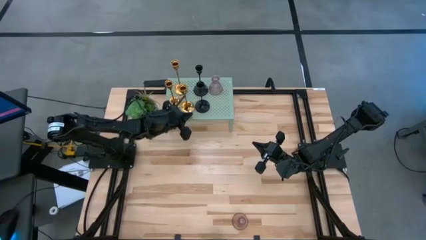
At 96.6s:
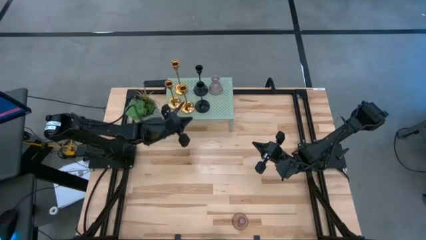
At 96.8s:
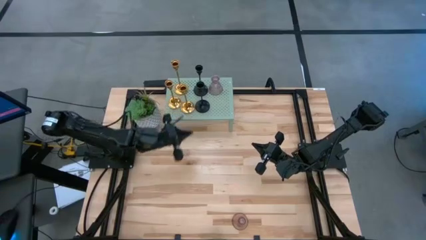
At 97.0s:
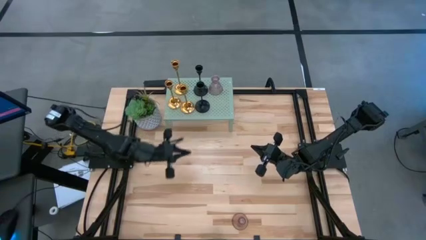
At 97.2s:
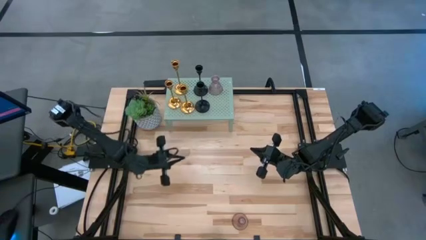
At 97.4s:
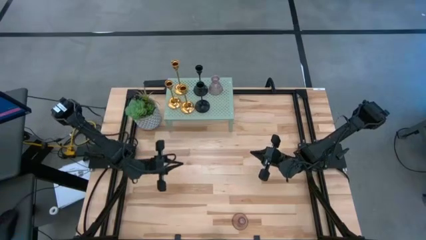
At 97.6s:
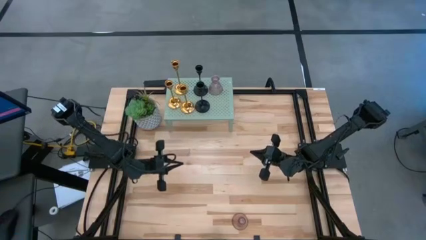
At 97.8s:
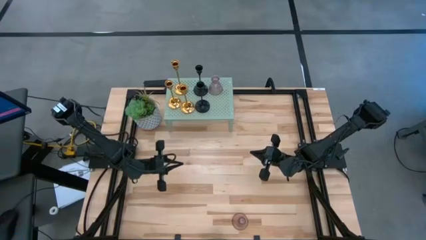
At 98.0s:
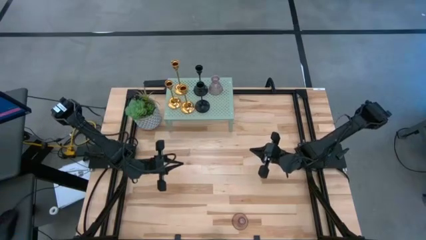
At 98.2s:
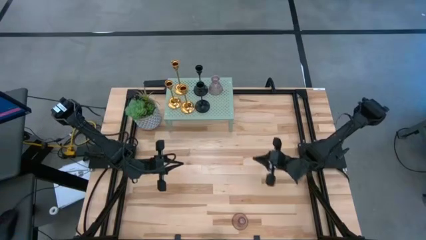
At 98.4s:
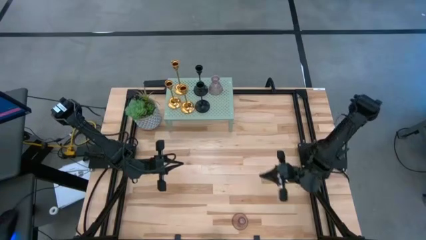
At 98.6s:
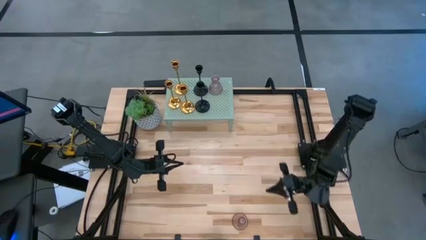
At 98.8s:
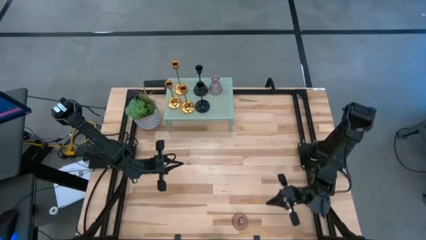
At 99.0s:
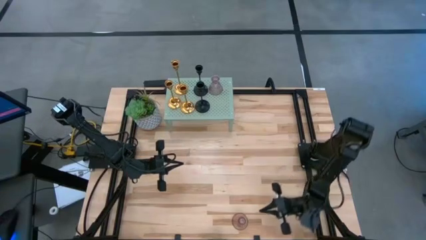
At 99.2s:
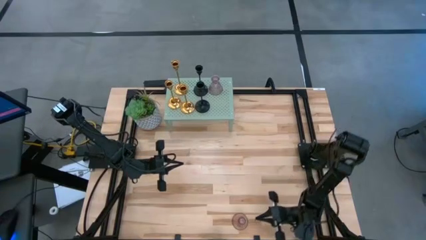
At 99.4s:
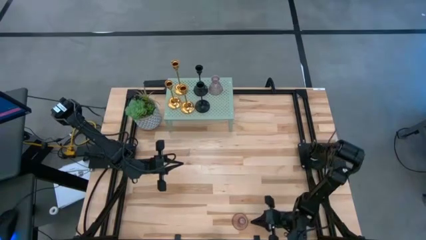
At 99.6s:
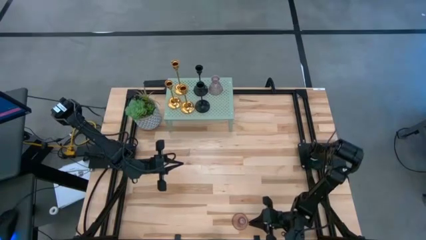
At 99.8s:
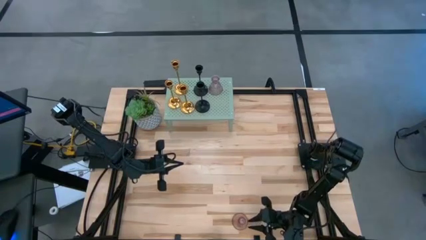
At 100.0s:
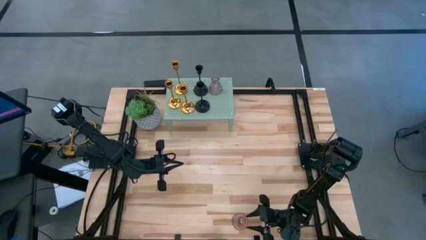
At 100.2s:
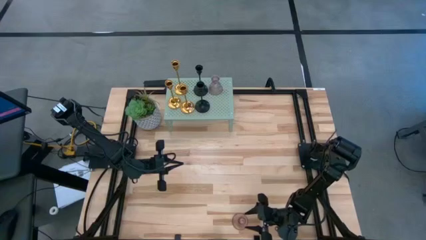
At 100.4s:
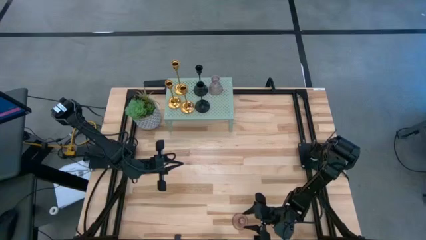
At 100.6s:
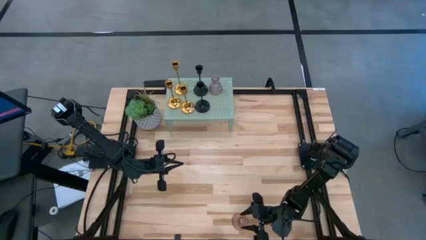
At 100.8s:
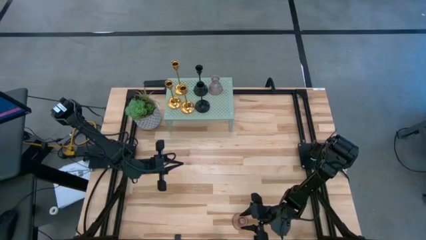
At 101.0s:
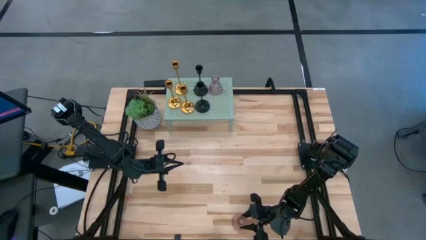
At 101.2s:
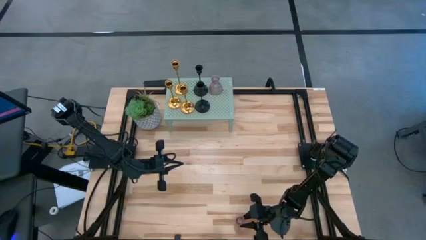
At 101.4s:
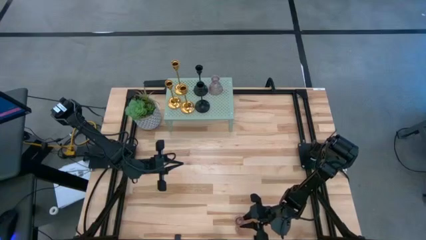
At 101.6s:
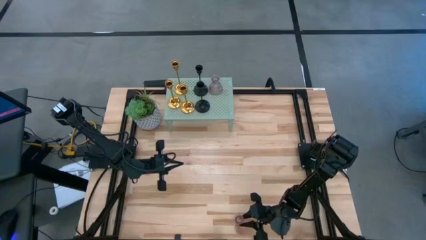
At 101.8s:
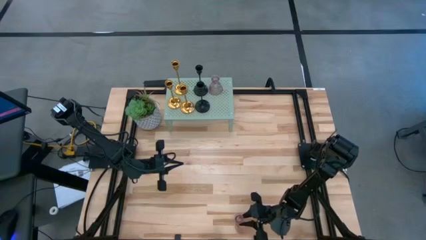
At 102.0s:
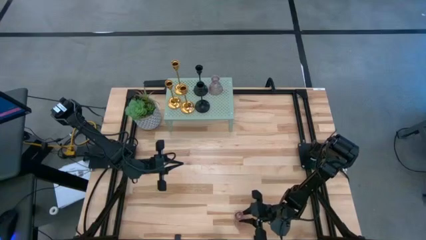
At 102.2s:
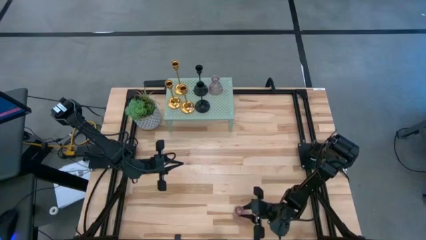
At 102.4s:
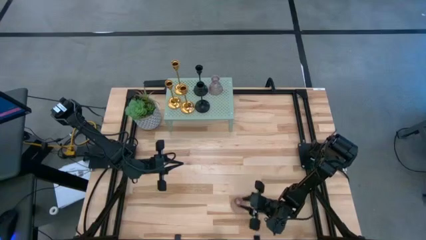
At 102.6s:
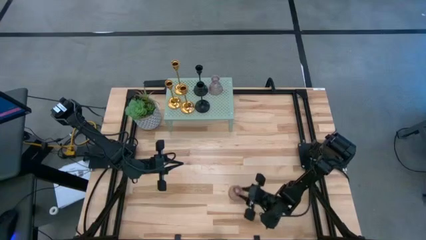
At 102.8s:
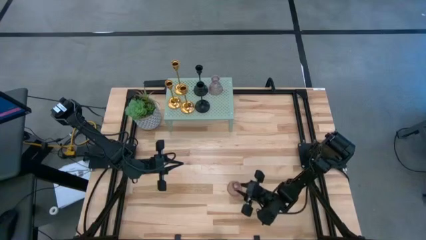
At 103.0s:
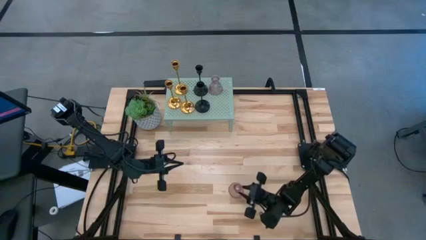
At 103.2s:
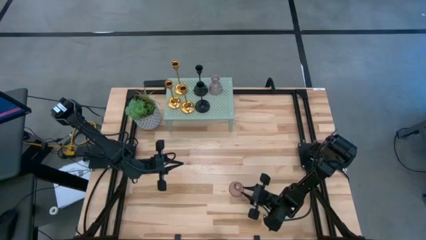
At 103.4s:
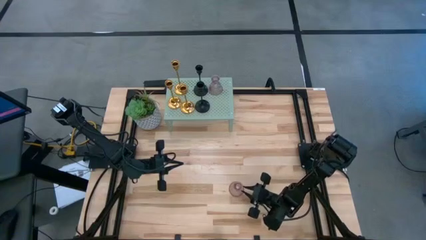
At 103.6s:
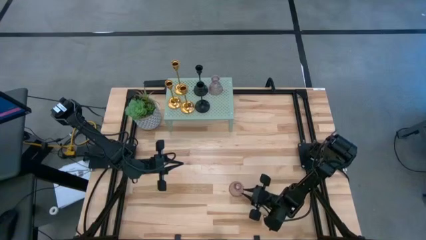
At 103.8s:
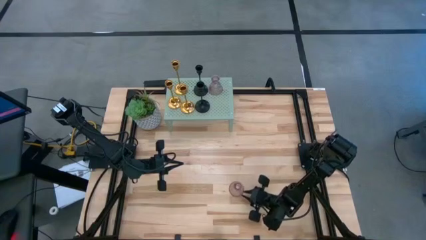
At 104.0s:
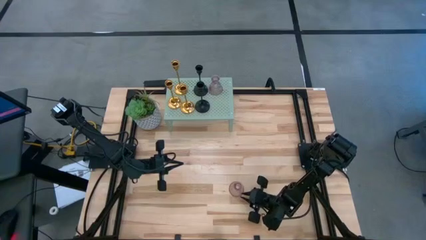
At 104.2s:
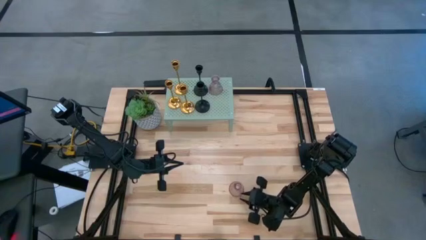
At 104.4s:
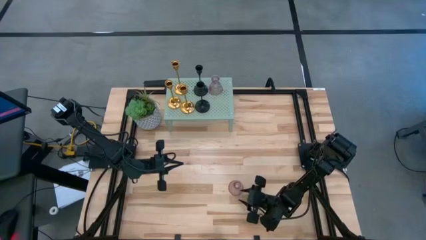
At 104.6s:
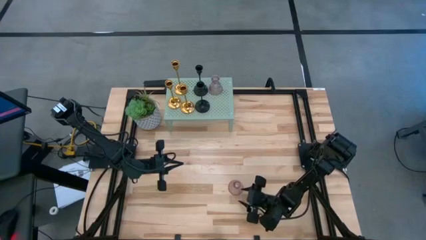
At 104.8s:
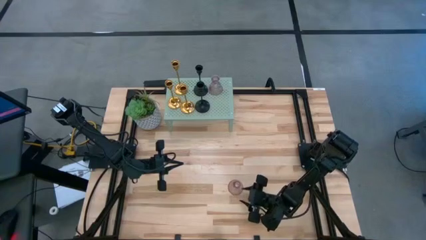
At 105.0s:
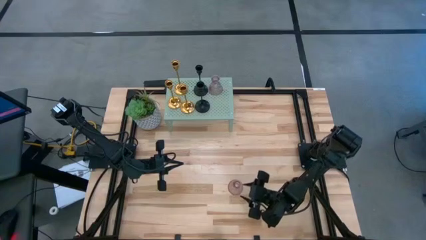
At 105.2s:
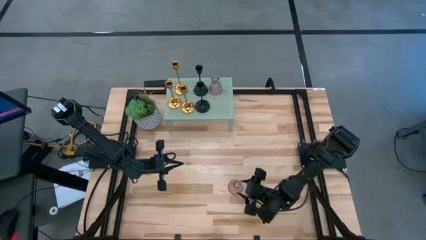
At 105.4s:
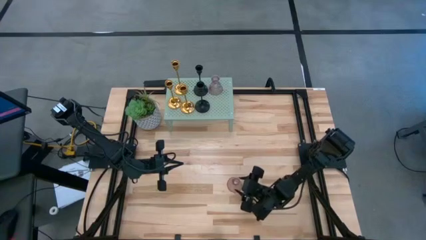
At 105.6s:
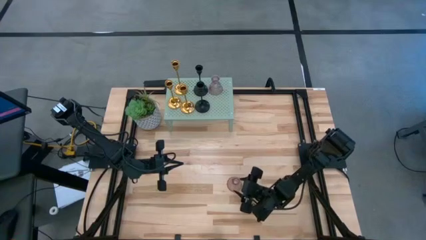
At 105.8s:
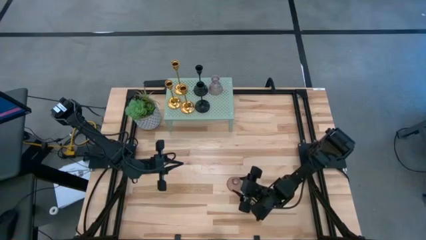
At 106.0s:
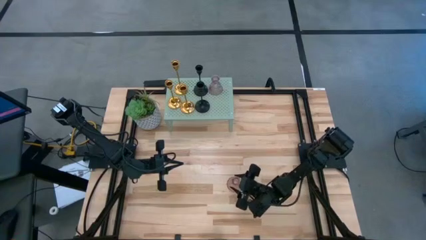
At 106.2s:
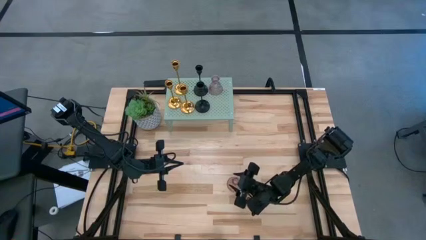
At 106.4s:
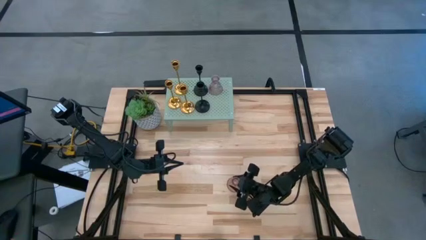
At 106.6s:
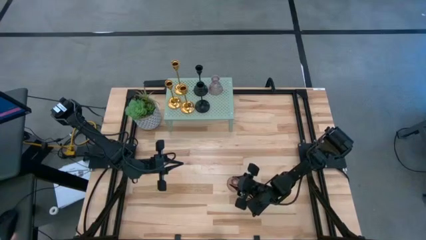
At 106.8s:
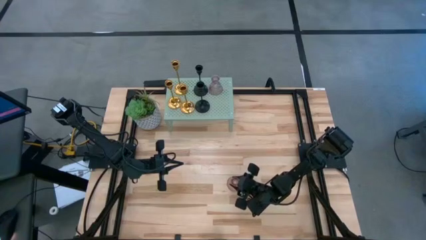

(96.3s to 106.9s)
Task: Pick & Place candle stick holders
Put the pink glass candle holder on the shelf

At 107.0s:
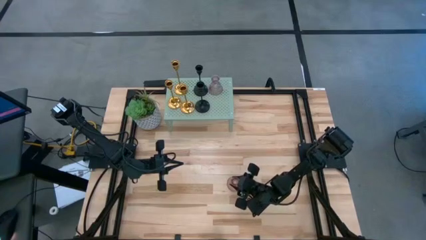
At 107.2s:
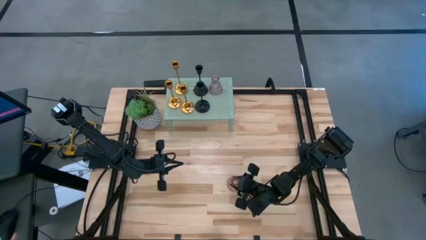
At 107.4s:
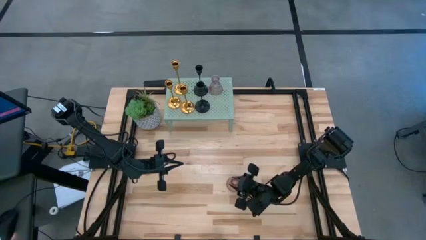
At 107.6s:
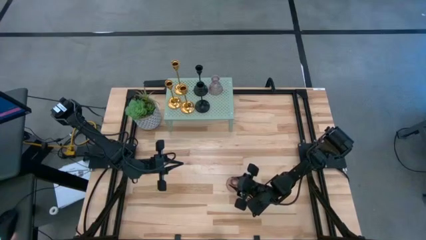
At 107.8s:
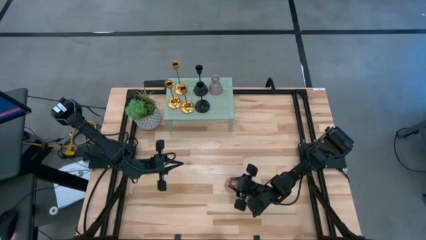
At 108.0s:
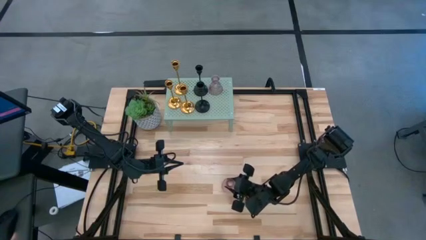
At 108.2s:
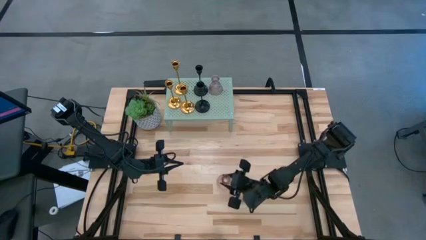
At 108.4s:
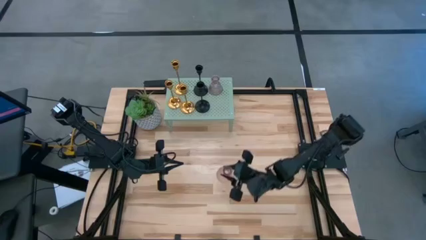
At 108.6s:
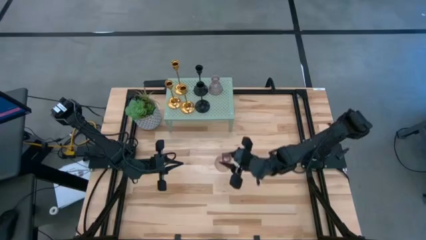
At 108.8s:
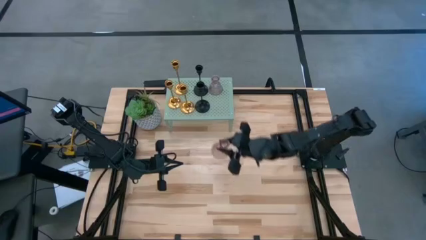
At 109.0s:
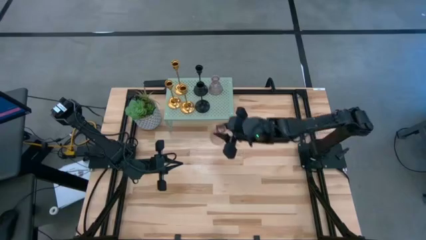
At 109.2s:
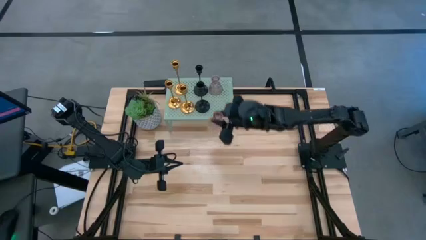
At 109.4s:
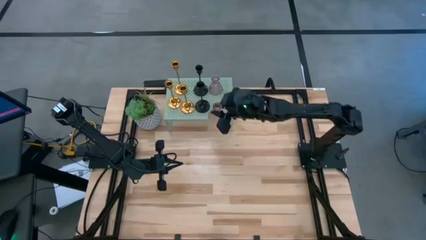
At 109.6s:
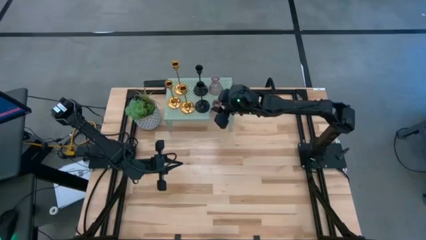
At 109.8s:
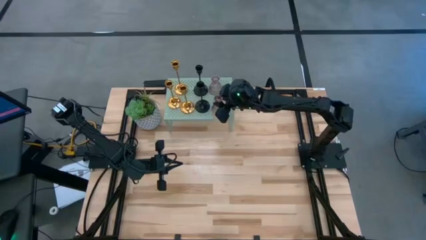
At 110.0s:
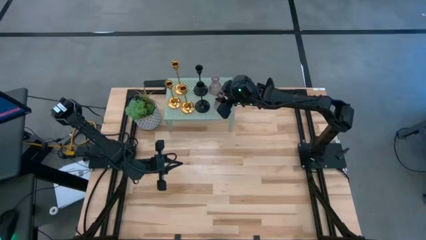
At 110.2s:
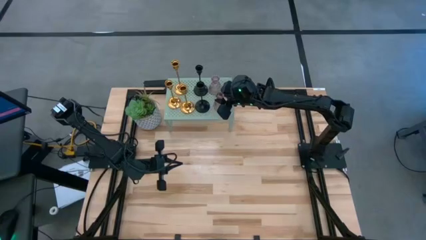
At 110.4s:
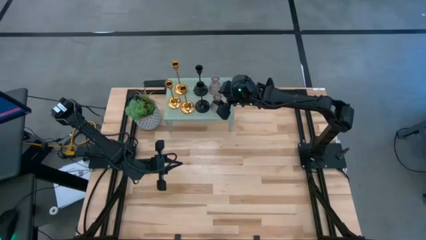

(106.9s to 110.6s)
Put the pink glass candle holder on the shelf

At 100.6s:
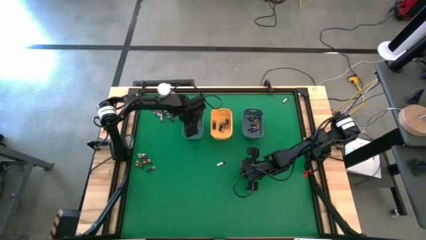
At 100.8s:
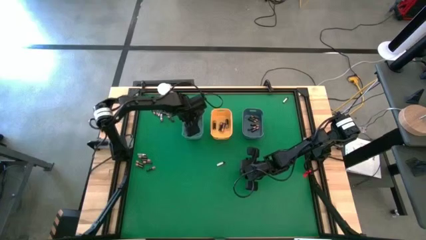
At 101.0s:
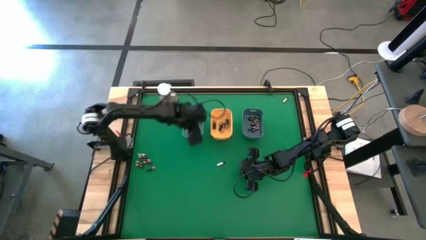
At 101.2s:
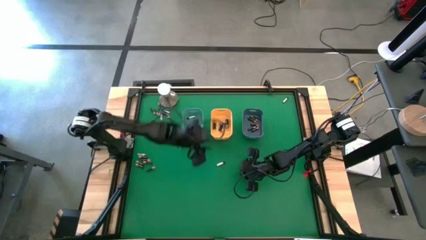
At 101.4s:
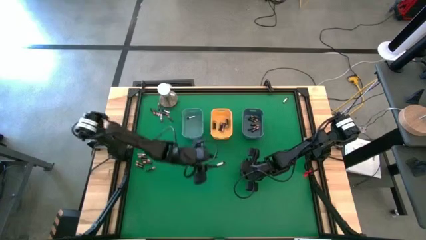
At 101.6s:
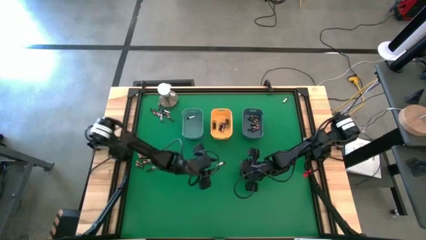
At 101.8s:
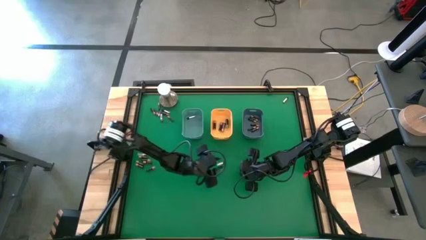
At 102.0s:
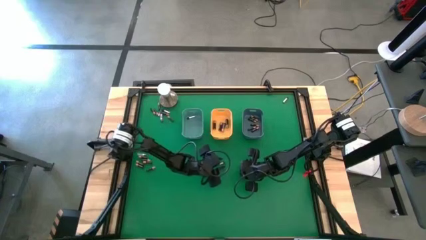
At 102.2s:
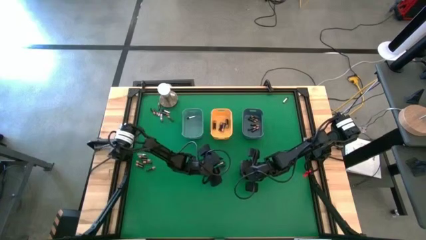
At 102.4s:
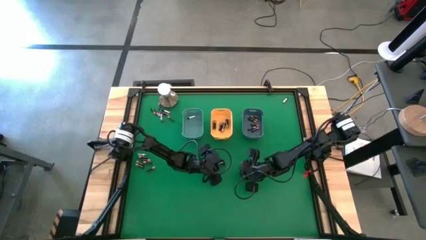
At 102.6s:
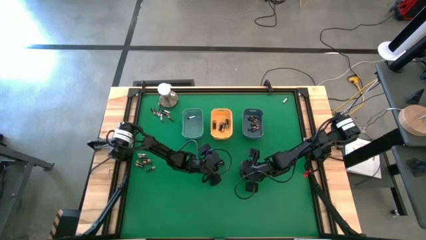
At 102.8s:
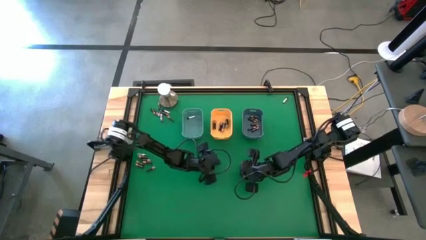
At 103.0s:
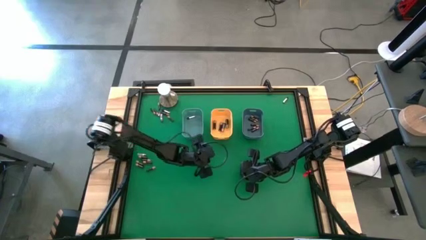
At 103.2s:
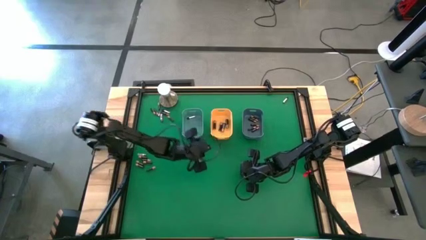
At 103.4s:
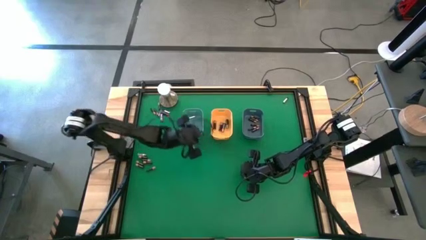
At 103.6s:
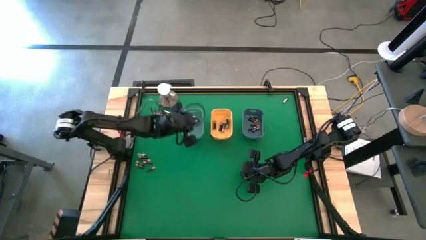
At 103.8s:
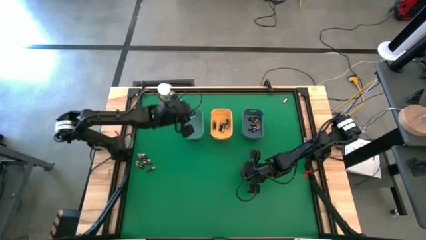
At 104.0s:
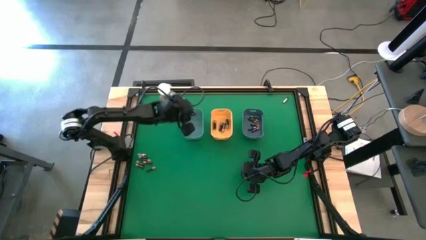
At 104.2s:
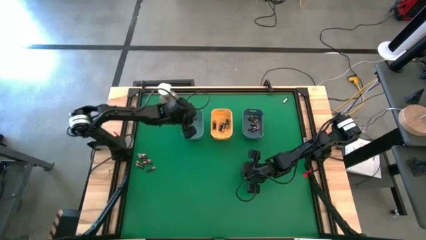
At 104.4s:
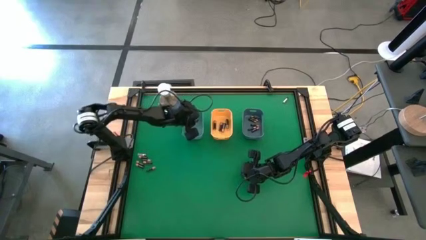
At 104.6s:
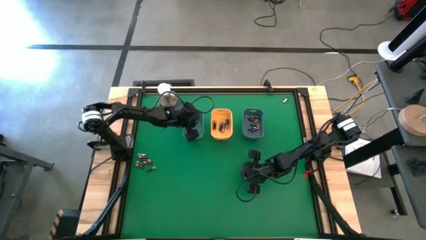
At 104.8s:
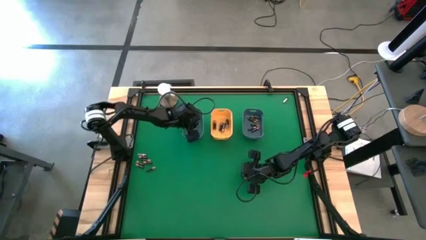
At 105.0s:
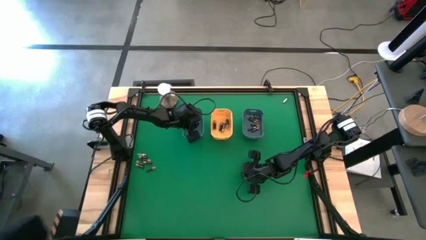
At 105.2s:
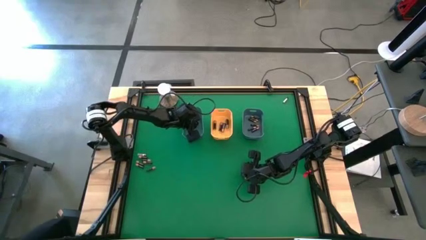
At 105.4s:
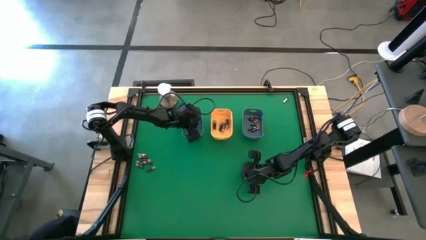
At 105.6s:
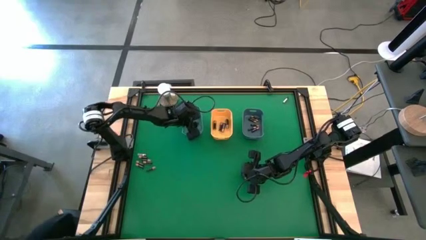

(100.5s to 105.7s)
Task: Sort batteries
Put the silver battery into the green bin
